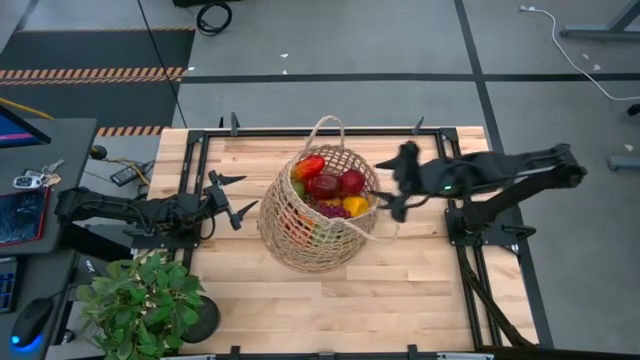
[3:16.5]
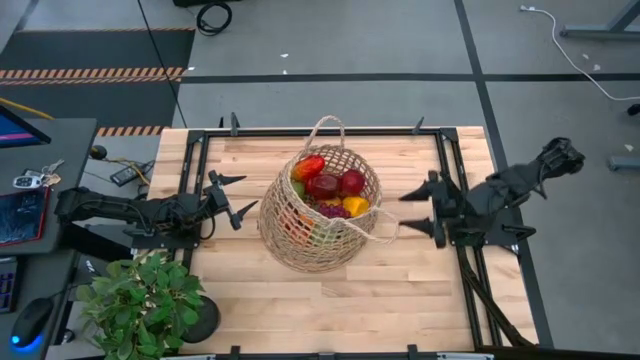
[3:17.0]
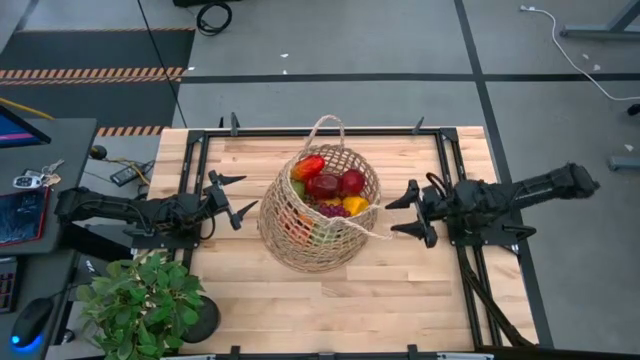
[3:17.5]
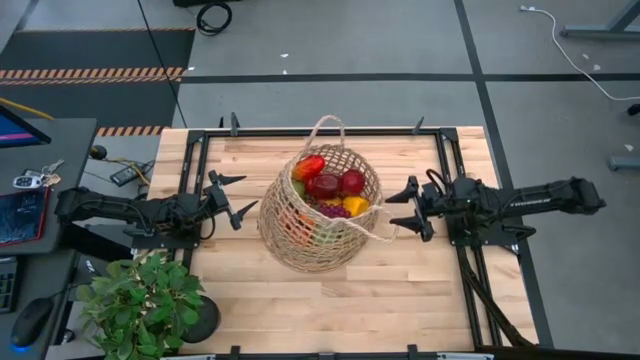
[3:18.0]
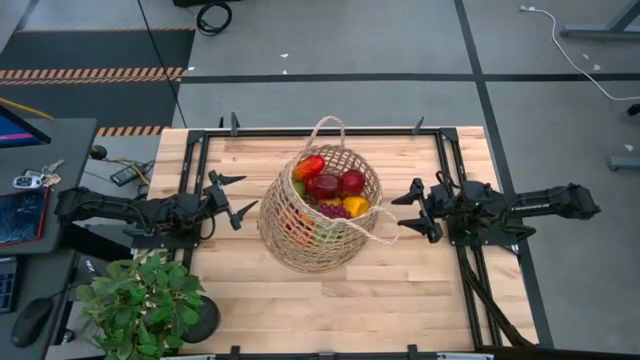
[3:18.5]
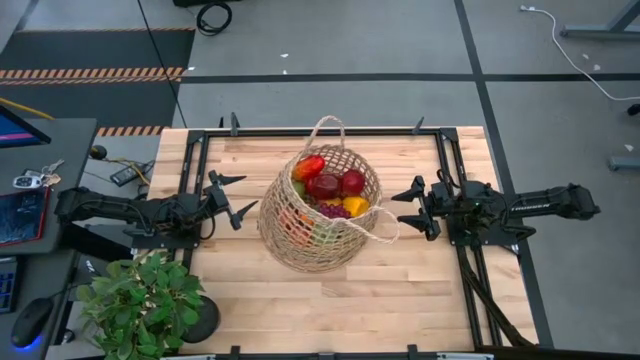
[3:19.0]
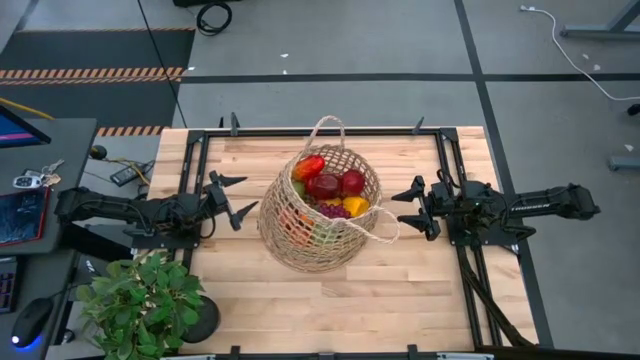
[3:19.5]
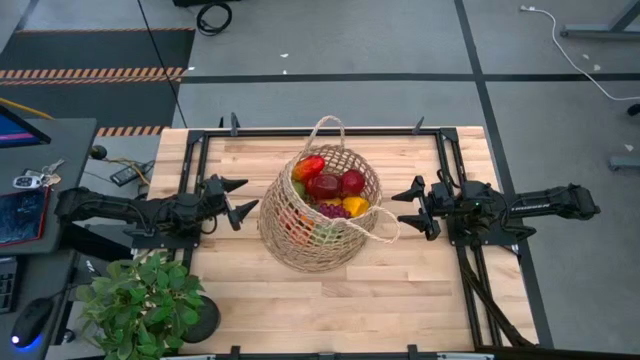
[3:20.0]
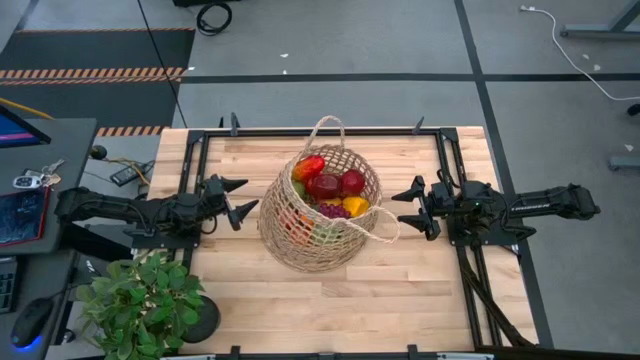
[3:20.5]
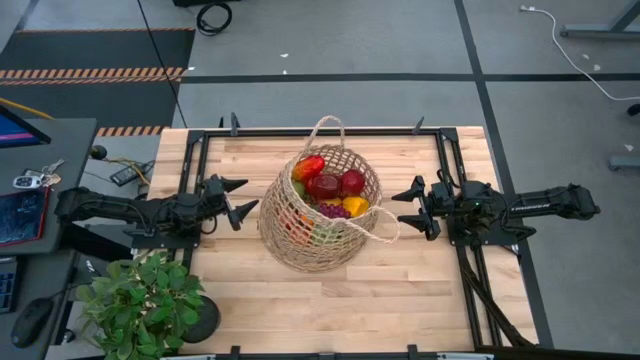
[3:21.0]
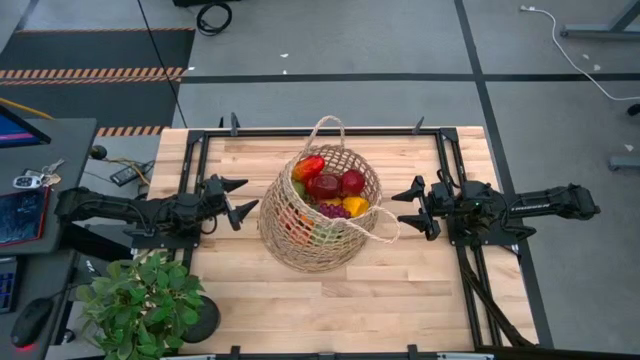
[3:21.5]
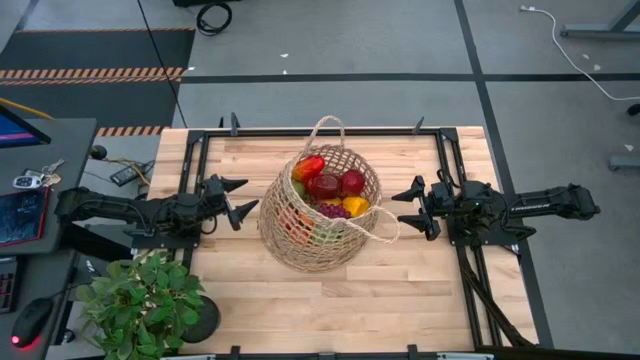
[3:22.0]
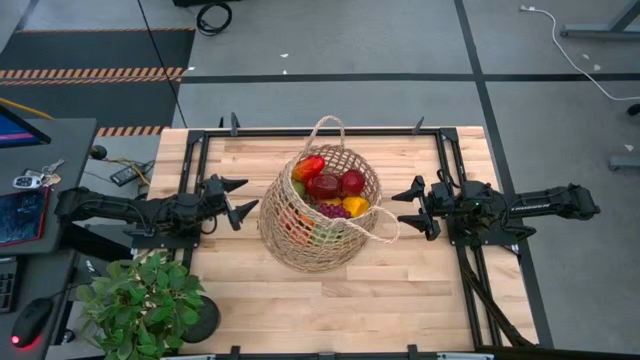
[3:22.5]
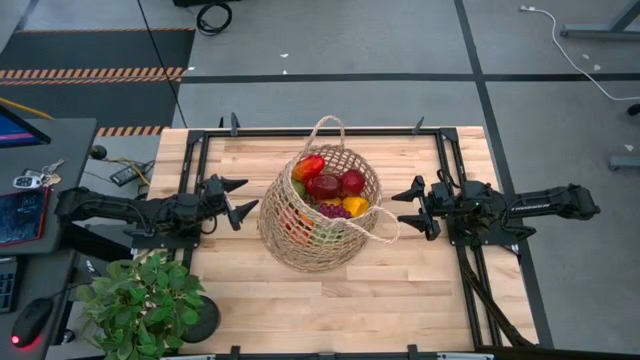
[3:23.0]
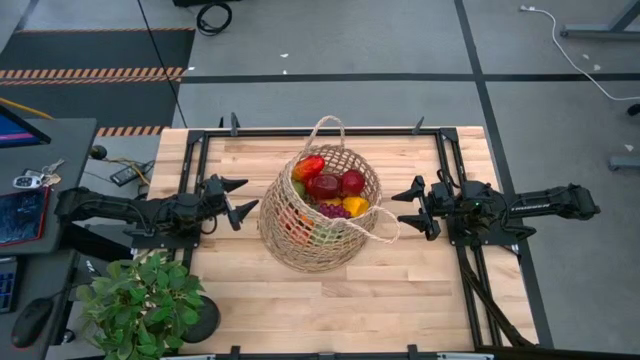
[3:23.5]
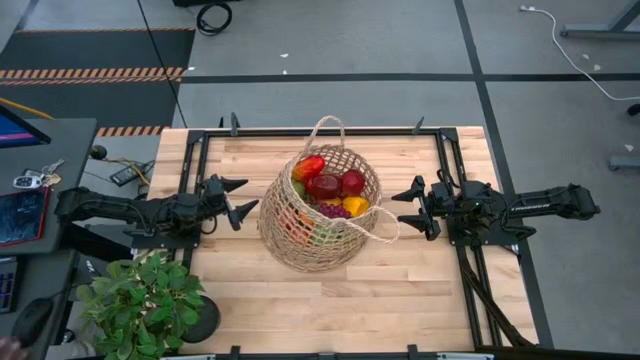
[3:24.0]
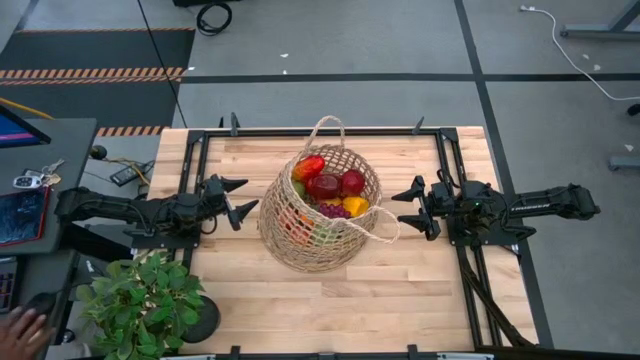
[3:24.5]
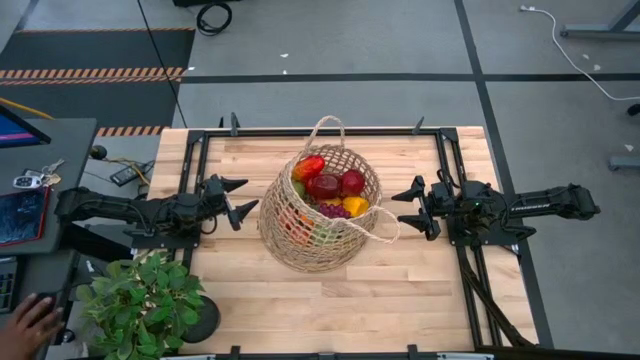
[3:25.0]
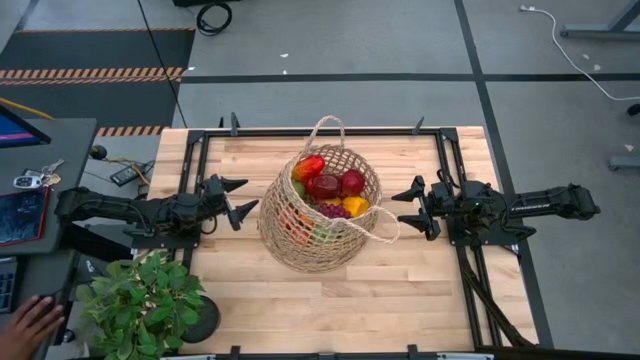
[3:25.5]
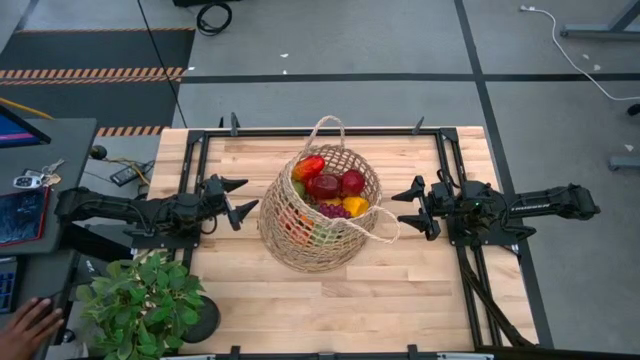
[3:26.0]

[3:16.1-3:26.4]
Task: Build produce basket
Return to Home Position

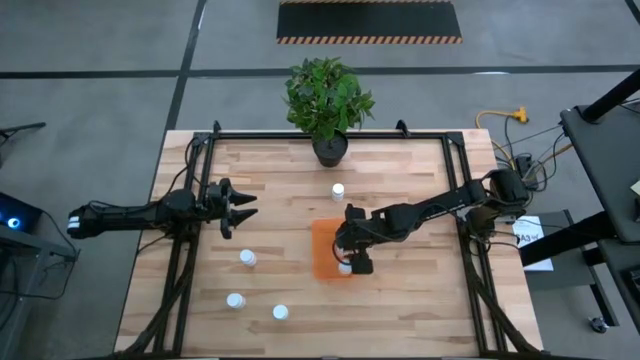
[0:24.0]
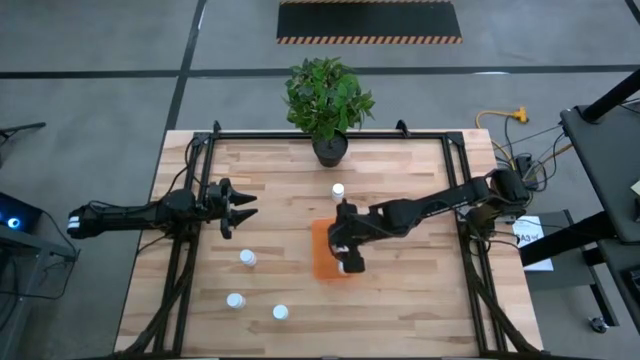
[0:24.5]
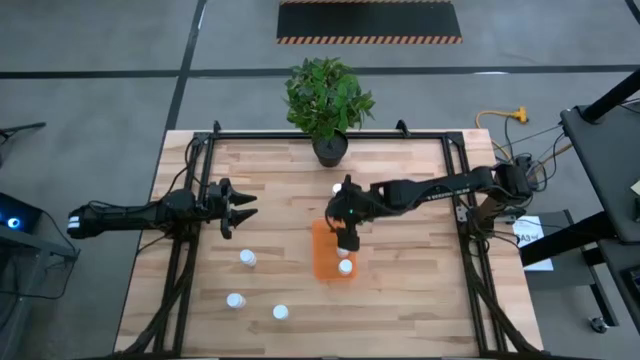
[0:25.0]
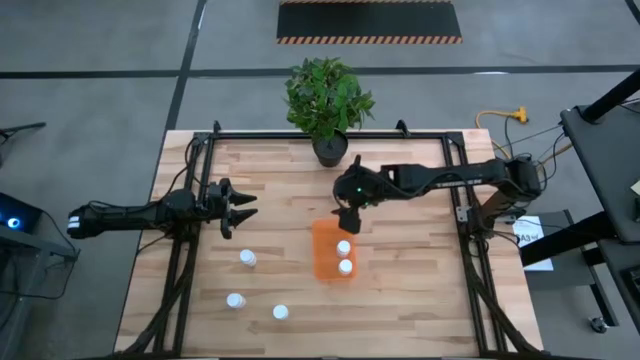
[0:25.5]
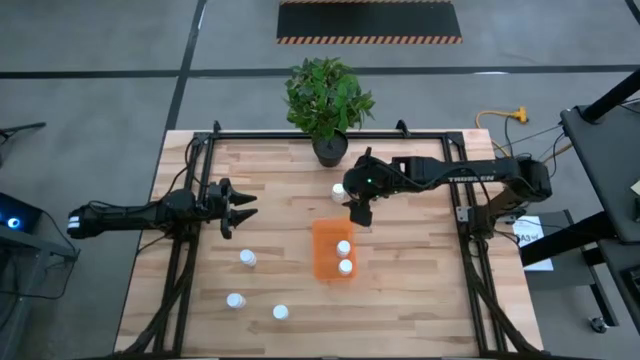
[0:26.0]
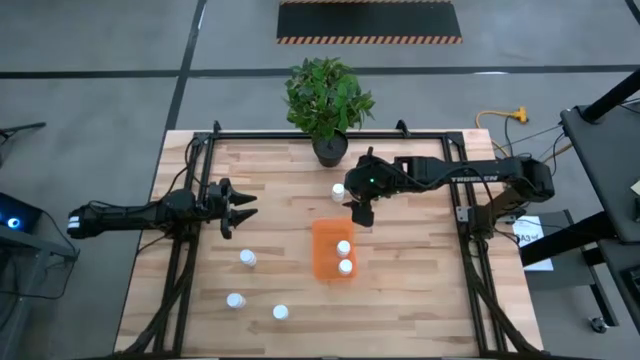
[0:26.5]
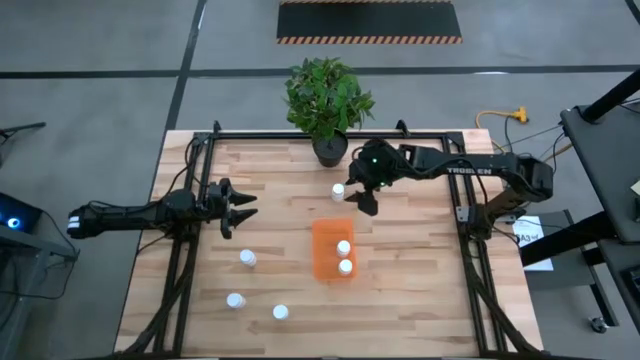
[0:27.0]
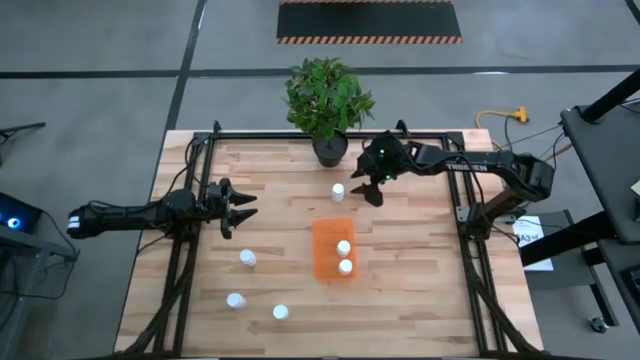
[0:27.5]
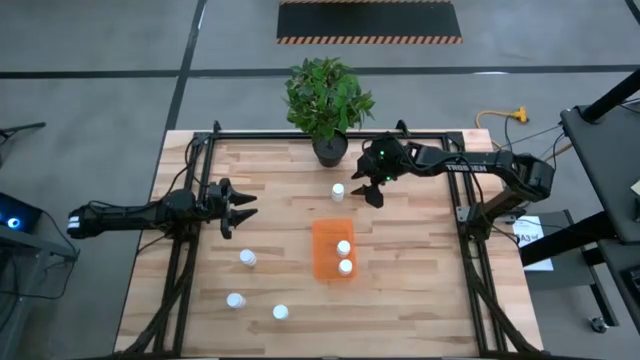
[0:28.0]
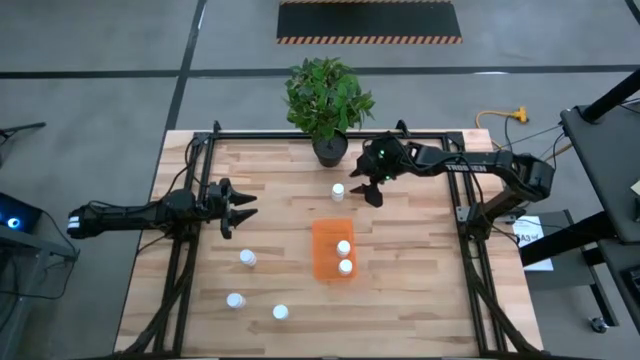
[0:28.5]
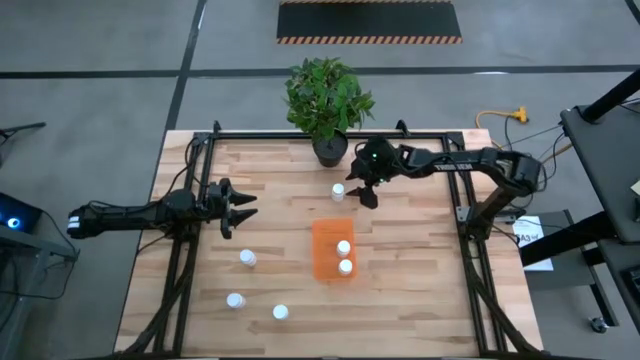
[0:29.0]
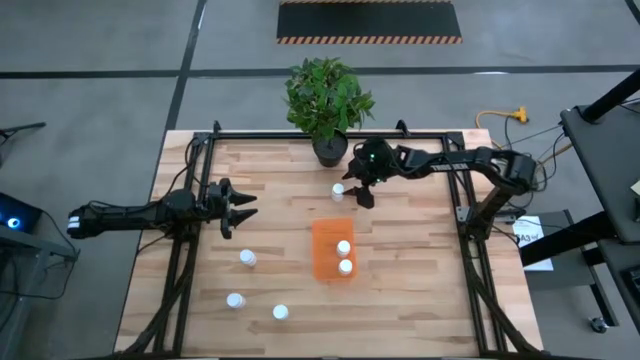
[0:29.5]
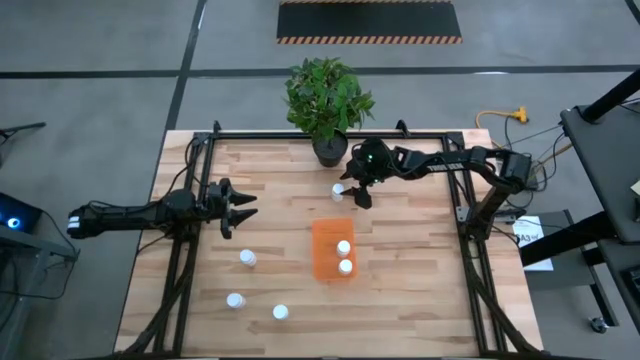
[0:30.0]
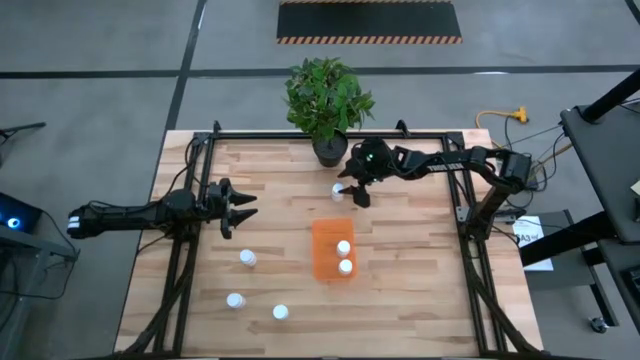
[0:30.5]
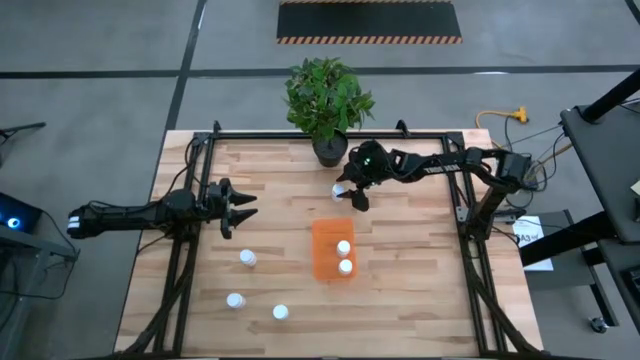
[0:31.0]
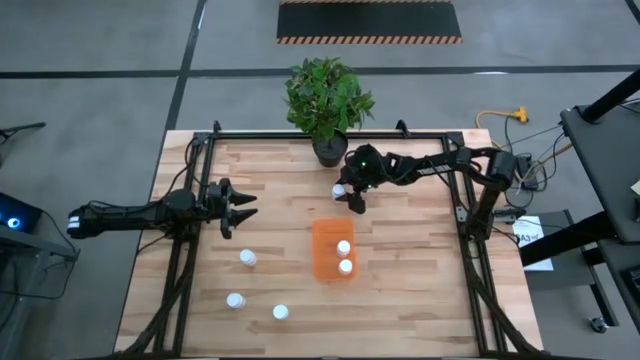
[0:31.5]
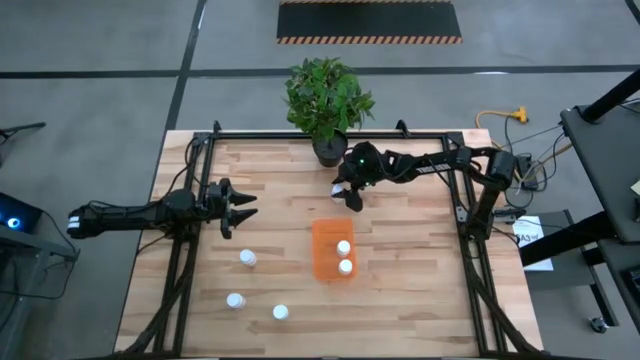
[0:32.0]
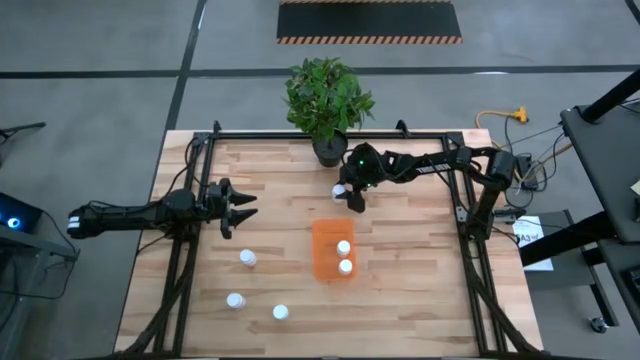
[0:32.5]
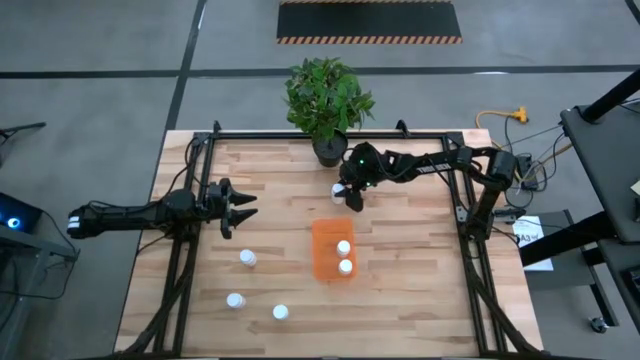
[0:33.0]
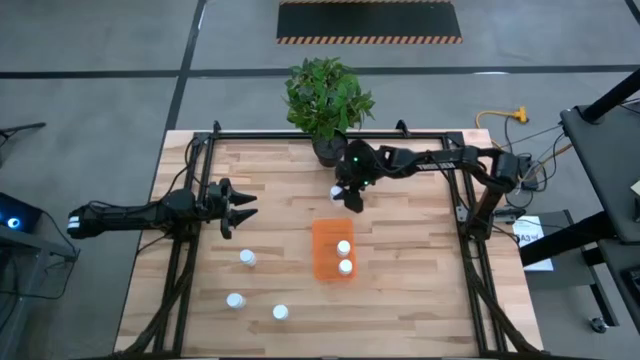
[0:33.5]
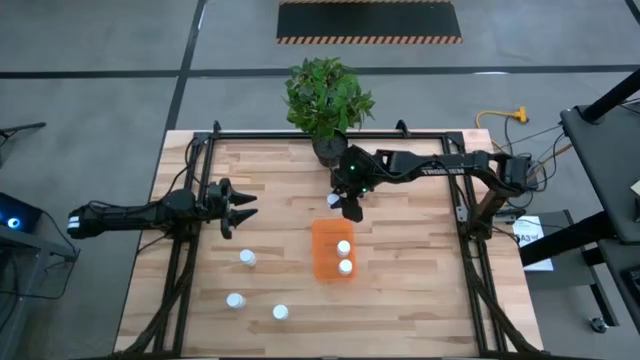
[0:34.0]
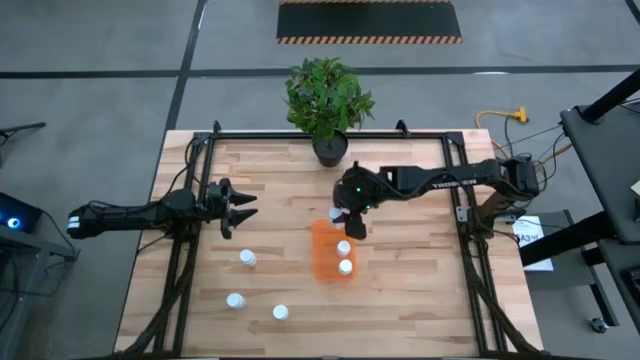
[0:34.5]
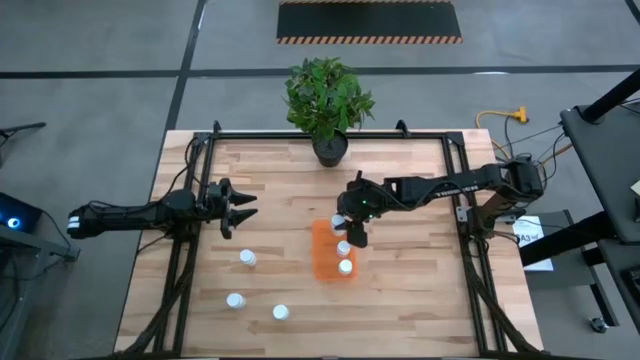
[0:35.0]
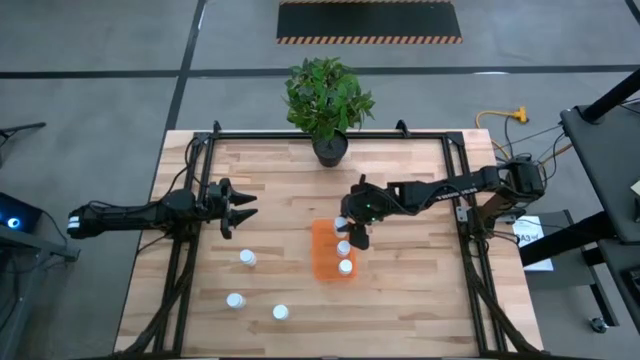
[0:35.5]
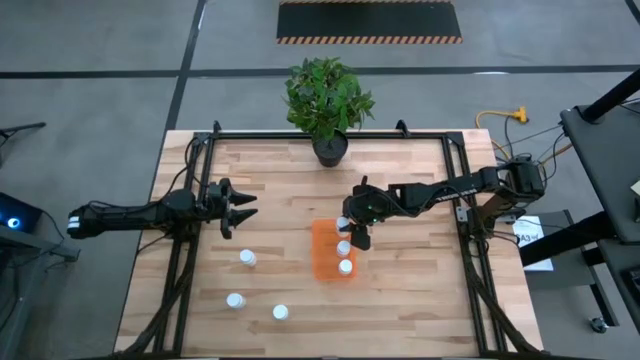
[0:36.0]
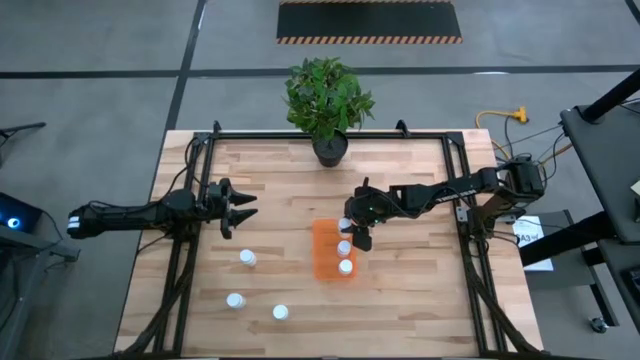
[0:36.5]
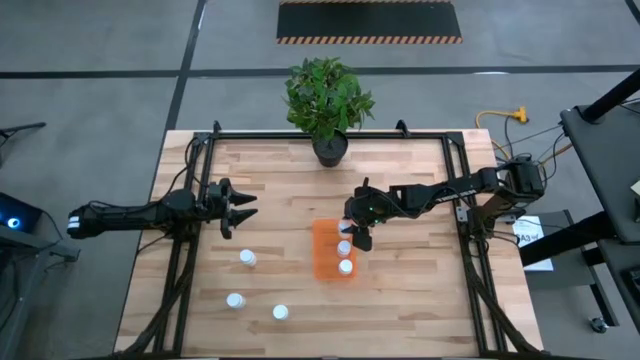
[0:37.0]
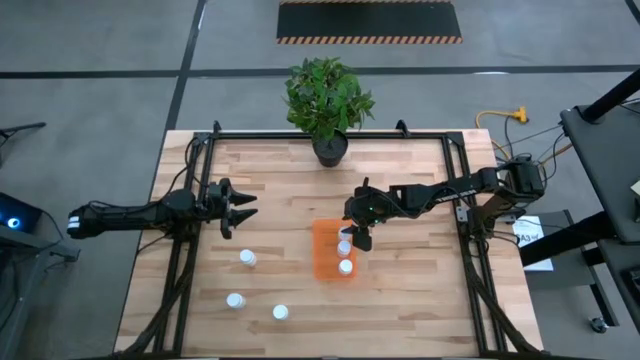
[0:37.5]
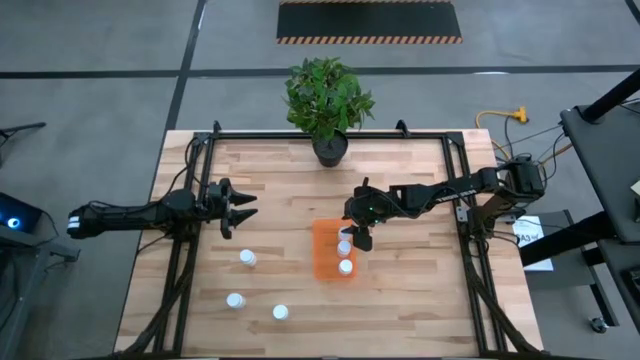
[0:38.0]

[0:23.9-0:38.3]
Task: Pick and place pill bottles into a basket
Put the white pill bottle into the orange bin
